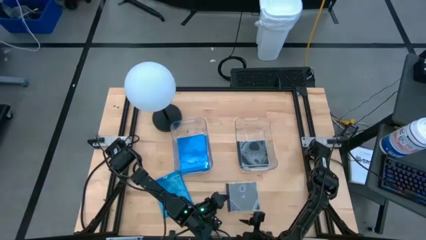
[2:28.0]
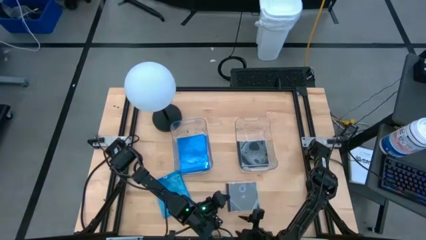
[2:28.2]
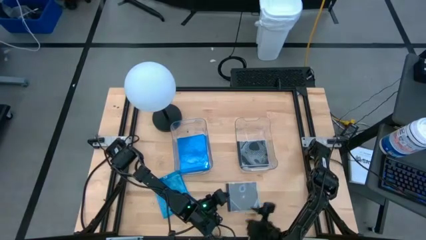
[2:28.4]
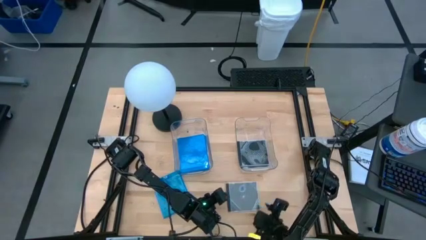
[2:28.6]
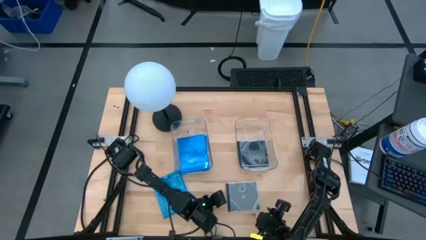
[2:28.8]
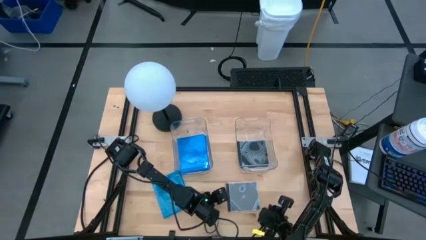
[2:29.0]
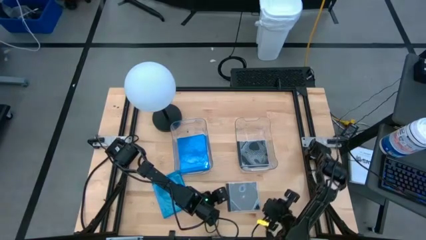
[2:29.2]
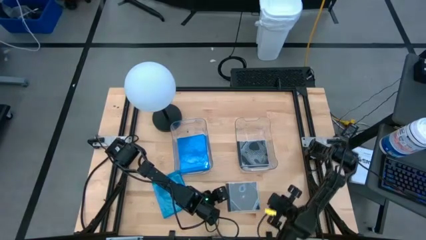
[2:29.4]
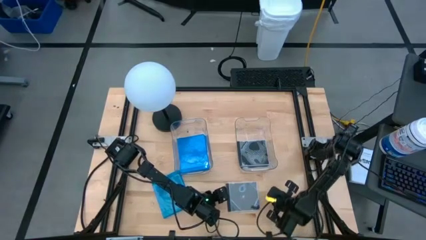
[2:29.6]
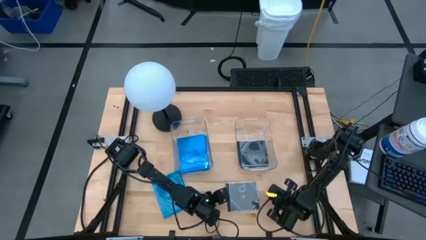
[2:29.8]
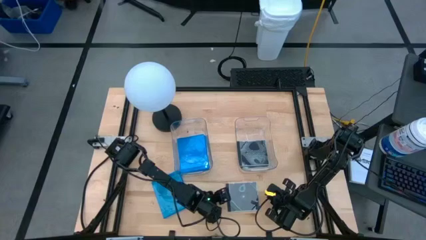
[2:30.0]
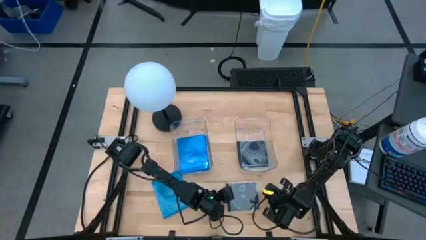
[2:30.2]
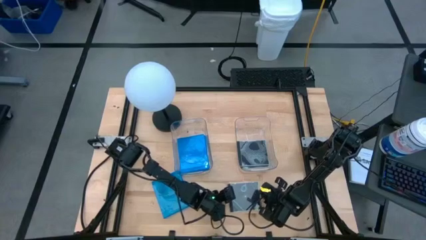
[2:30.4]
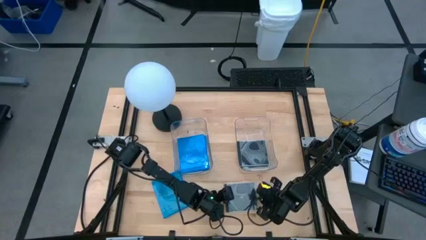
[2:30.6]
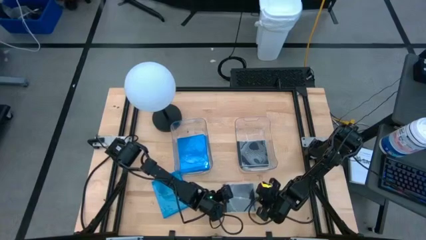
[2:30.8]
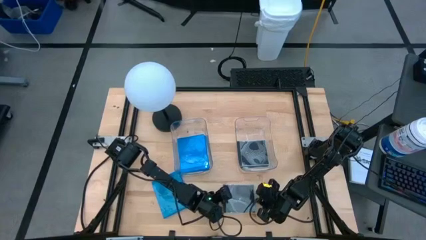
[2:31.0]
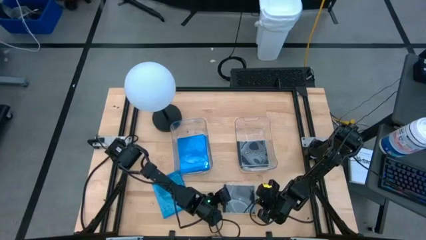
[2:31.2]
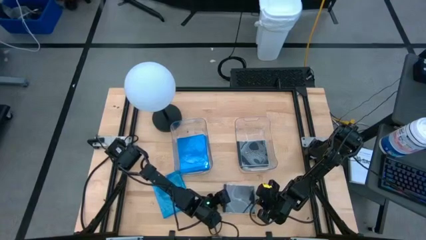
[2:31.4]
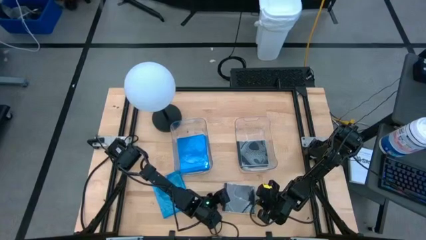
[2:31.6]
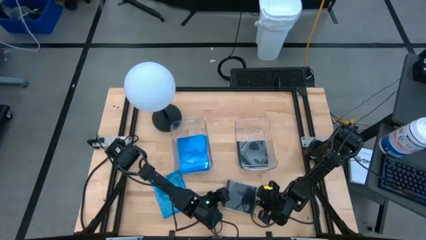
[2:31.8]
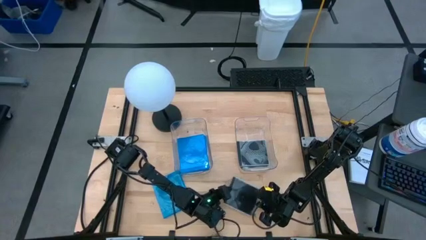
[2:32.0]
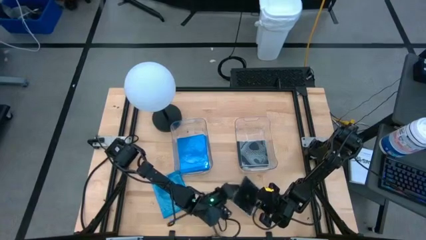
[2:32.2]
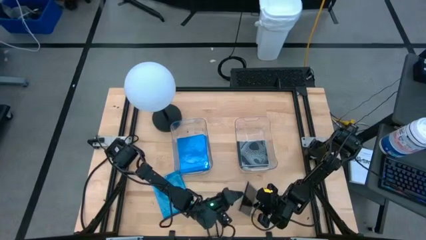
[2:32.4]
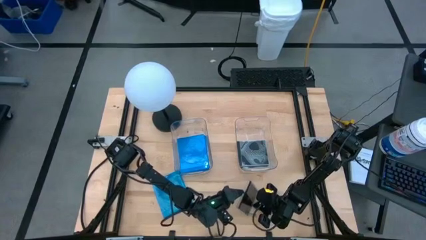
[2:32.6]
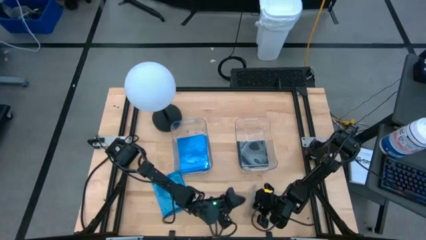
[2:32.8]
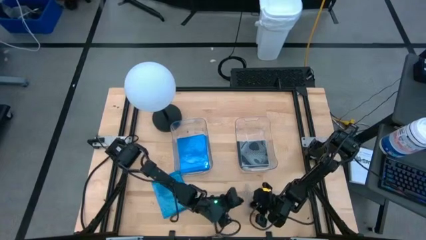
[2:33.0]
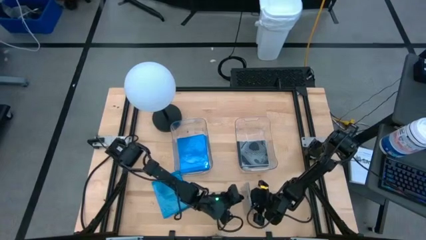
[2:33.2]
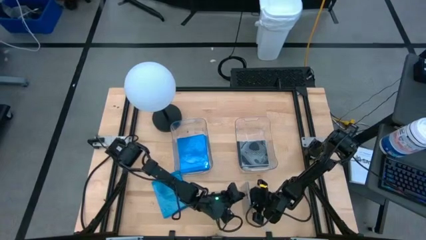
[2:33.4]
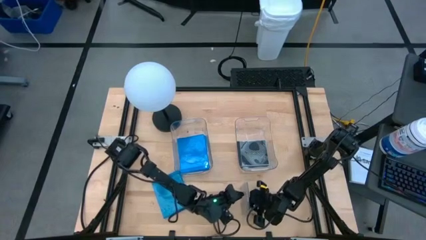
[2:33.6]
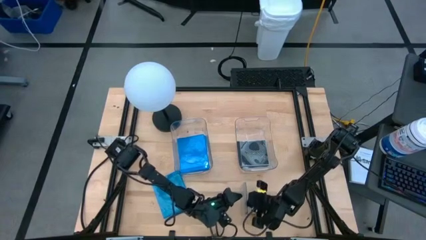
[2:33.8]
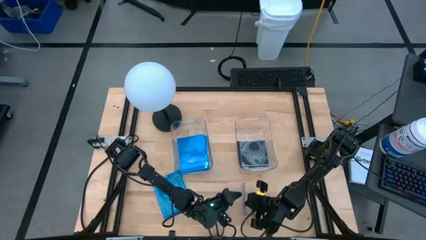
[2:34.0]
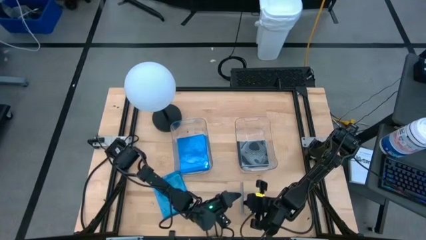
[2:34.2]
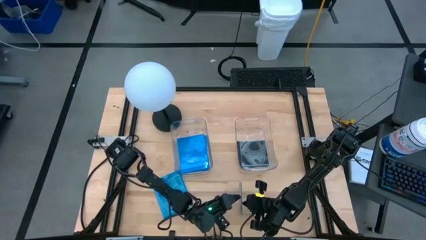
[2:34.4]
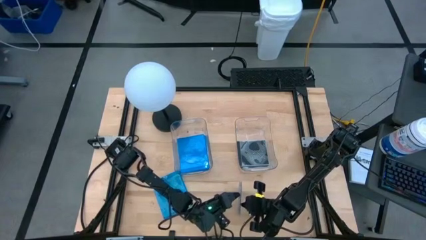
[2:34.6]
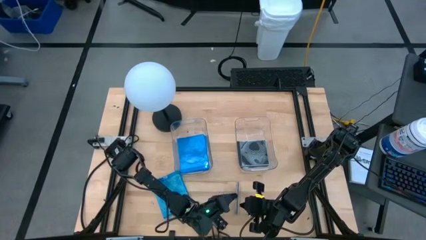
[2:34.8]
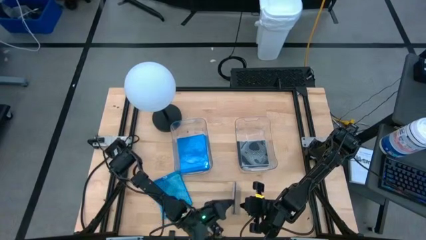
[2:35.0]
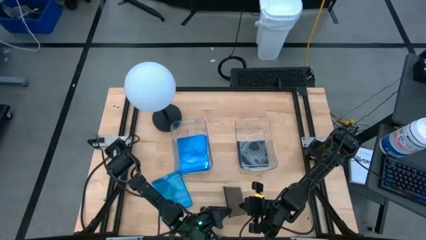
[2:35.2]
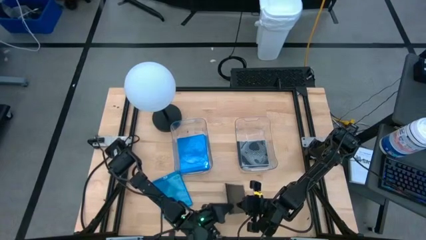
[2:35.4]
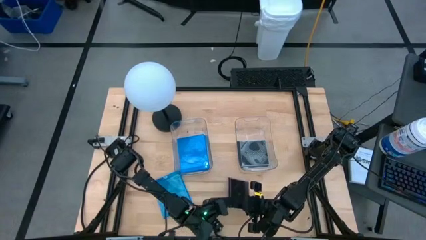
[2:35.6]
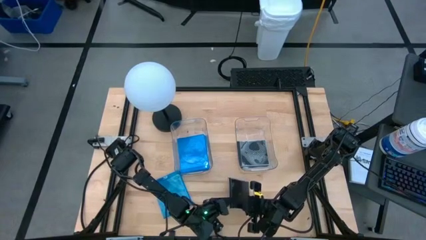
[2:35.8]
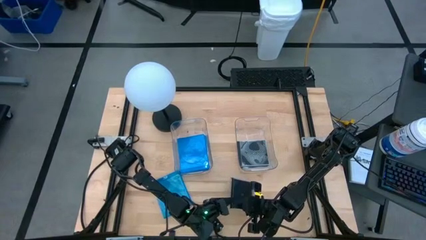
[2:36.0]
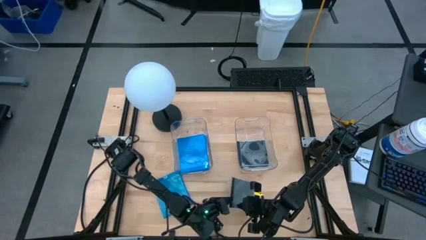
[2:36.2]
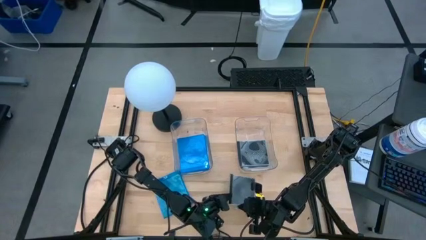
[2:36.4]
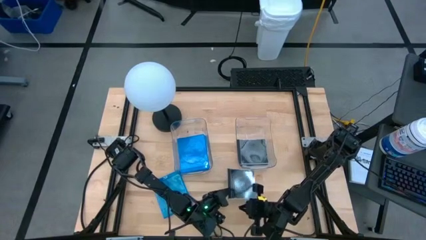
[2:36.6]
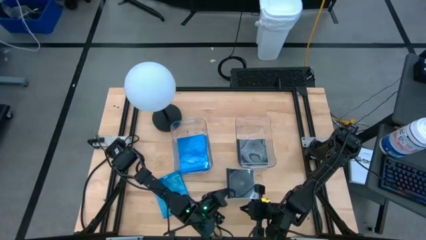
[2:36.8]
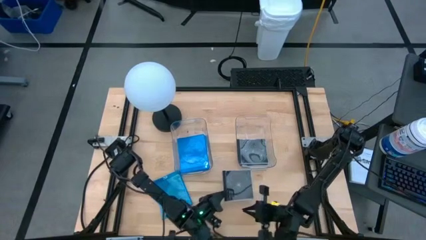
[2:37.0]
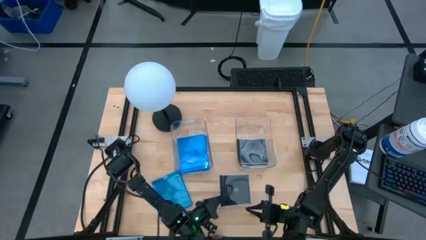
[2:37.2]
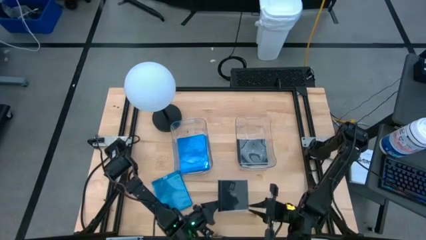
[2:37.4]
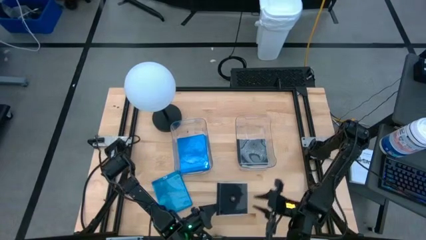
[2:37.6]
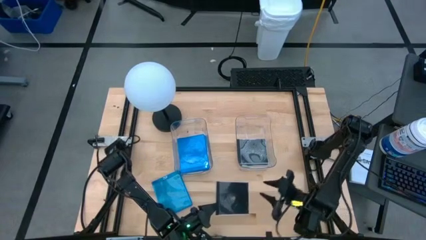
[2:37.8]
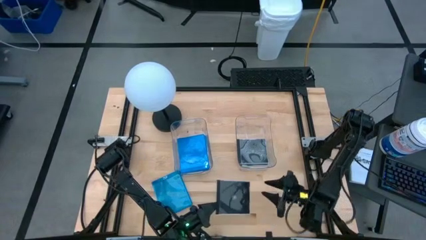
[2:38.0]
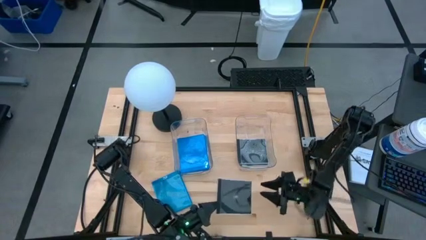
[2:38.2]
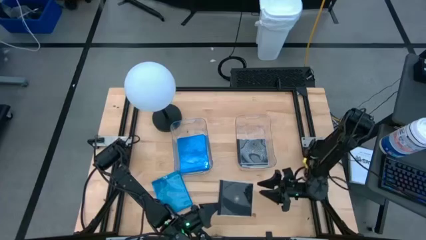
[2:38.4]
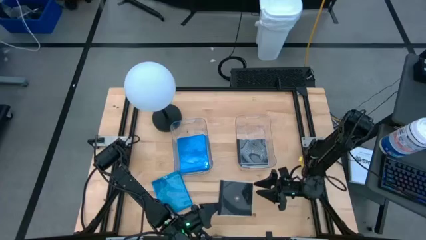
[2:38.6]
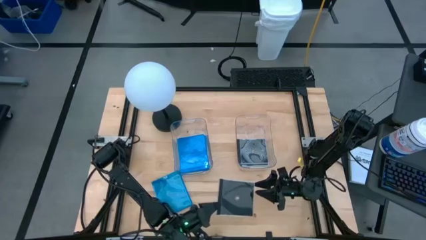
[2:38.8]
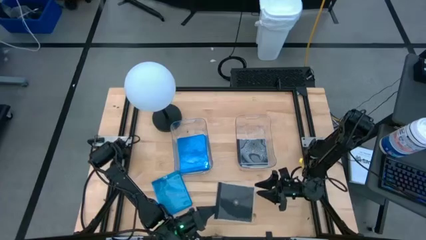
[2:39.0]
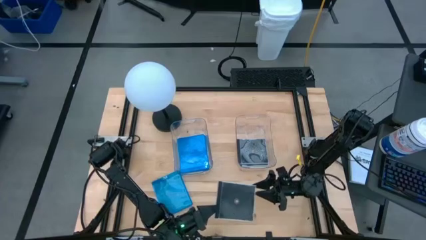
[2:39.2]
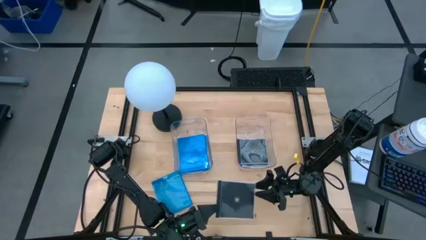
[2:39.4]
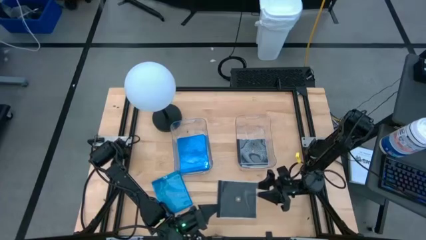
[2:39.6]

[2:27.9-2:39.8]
Task: Pick & place jewel cases by type
Put the black CD case into the right transparent bin

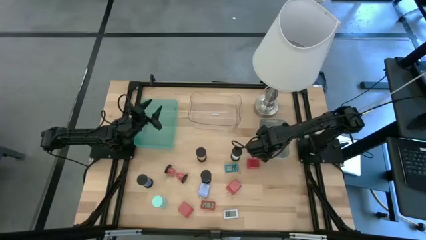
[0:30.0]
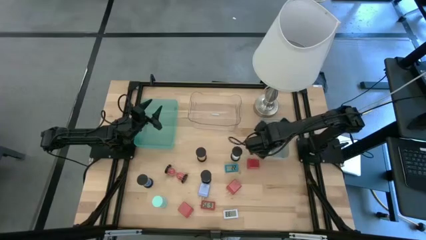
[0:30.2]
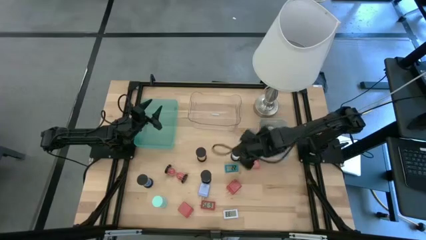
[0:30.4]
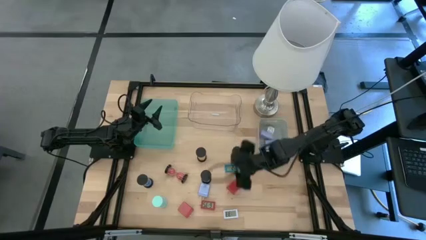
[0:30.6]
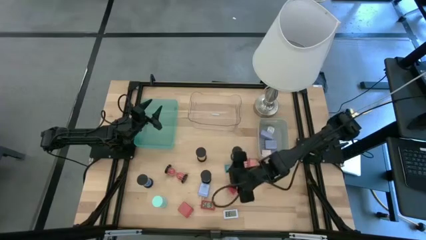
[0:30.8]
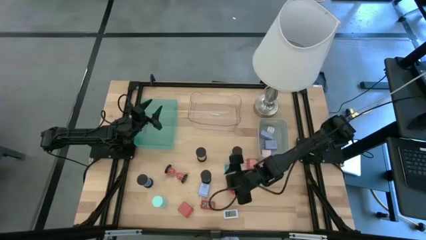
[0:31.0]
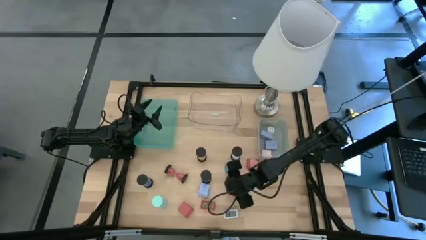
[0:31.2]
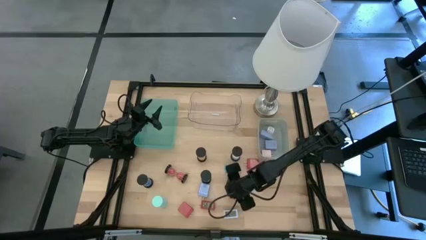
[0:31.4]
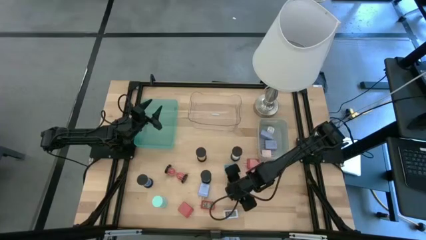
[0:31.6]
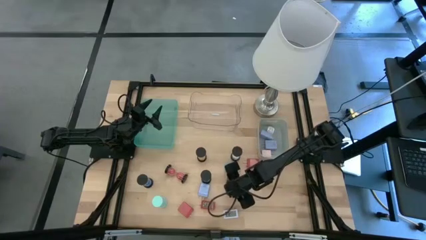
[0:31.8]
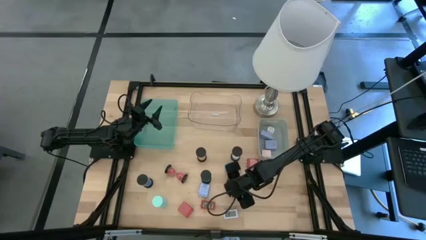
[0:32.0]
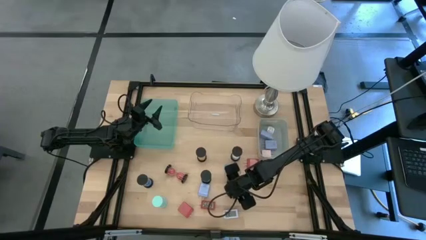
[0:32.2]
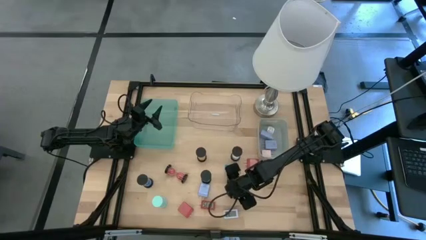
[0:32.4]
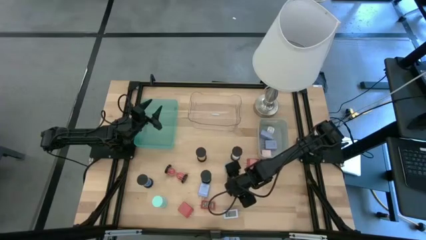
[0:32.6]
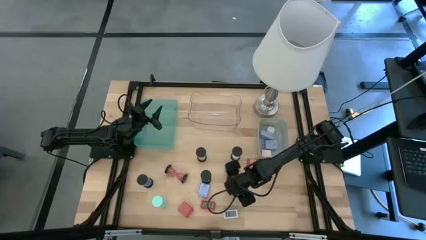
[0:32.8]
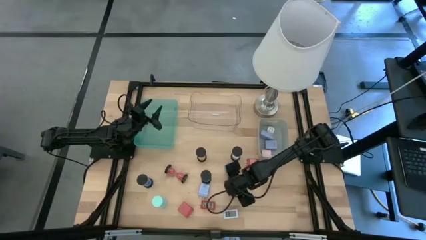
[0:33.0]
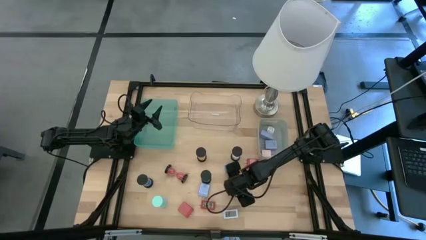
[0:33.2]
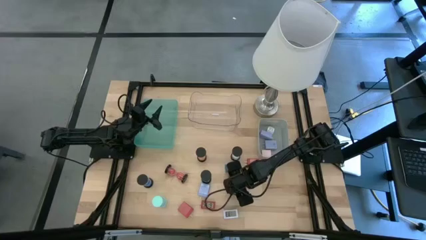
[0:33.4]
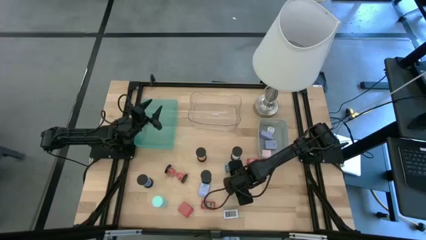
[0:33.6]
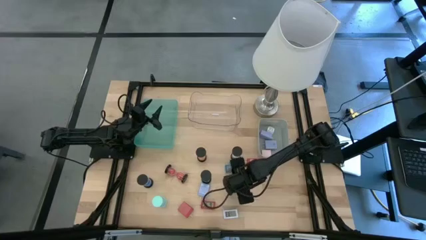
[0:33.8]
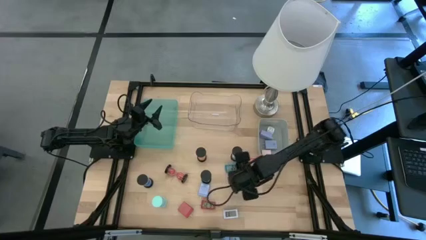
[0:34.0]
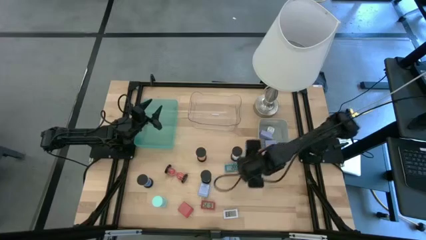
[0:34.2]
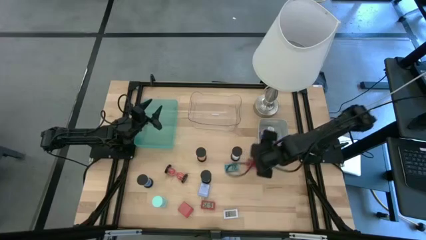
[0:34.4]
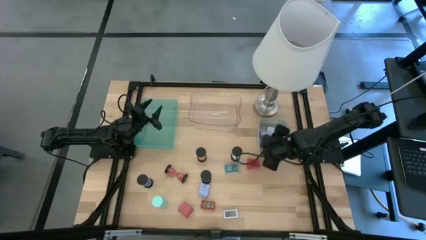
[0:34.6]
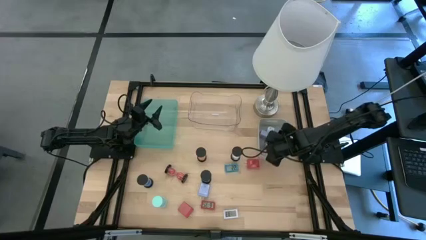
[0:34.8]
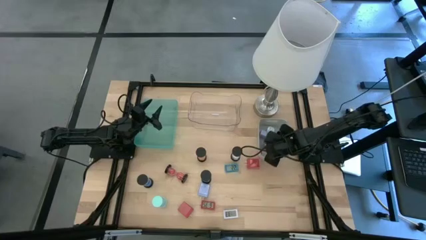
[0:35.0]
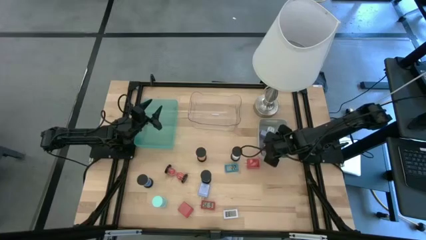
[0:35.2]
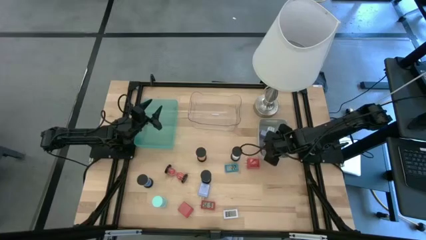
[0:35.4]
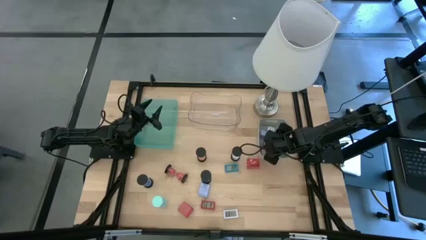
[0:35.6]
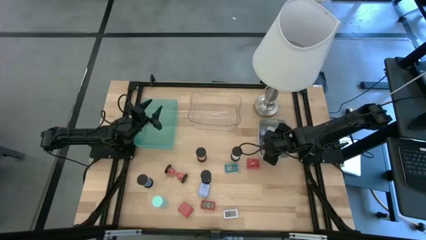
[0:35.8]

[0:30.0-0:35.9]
Task: Pick & Place Office items
Put the middle red charger adapter into the gray bin
